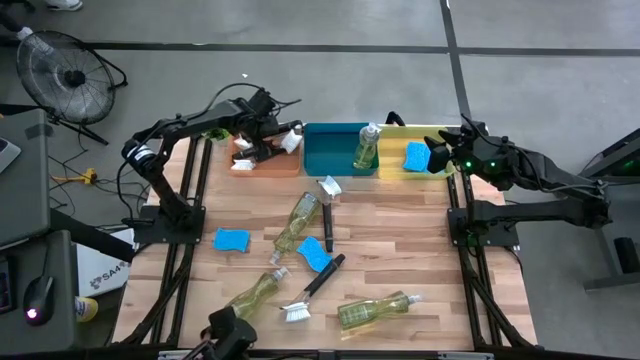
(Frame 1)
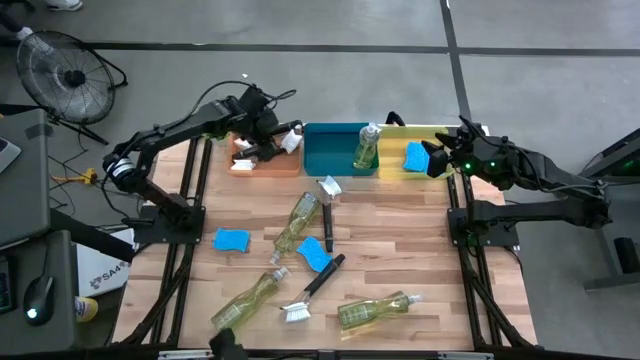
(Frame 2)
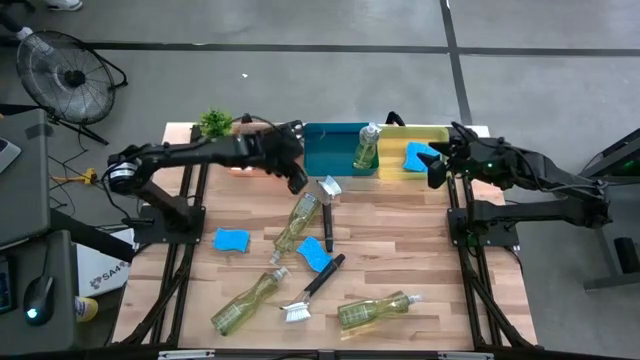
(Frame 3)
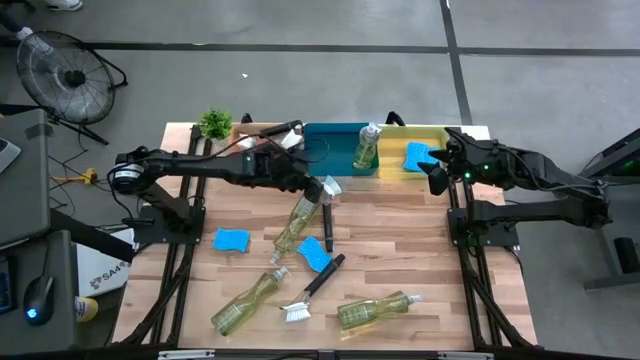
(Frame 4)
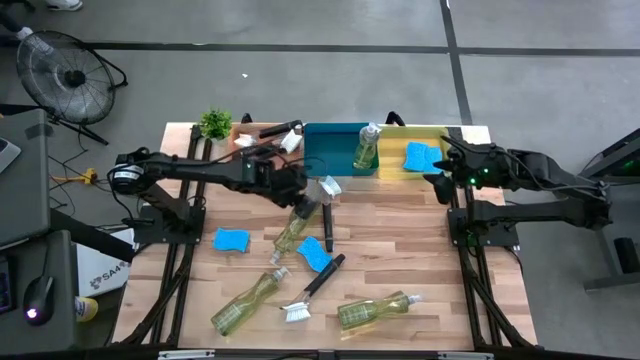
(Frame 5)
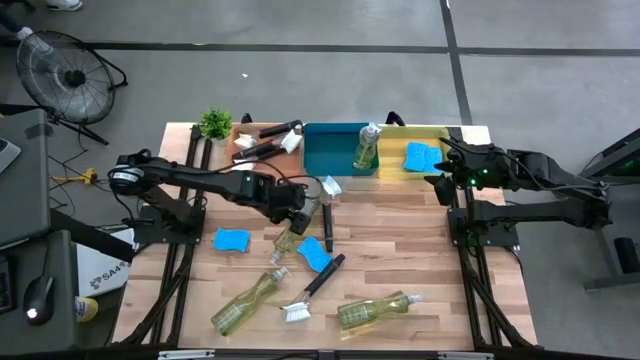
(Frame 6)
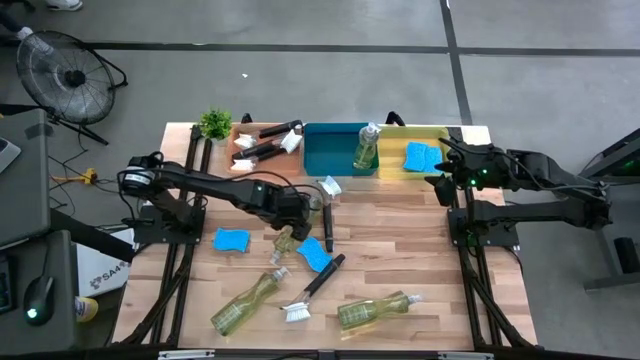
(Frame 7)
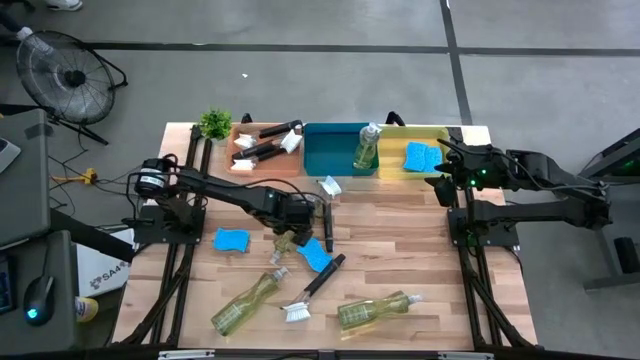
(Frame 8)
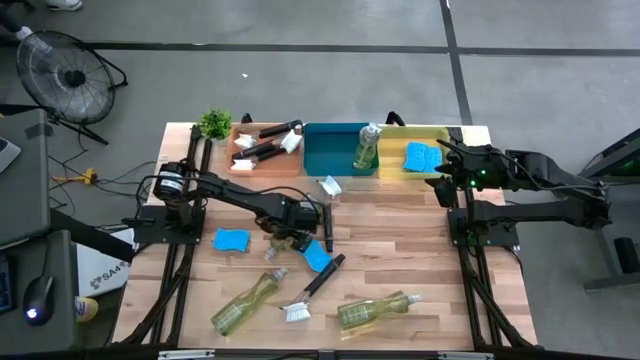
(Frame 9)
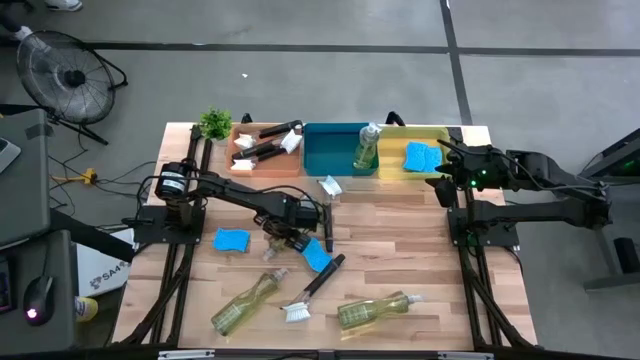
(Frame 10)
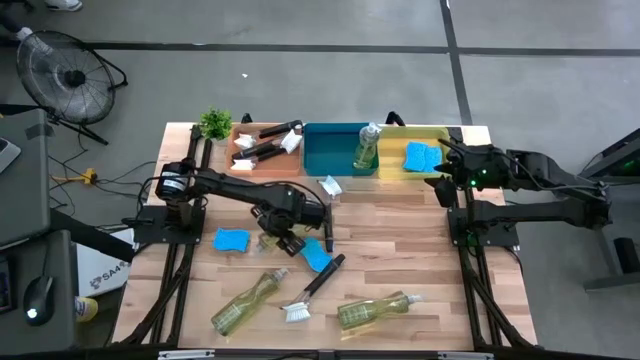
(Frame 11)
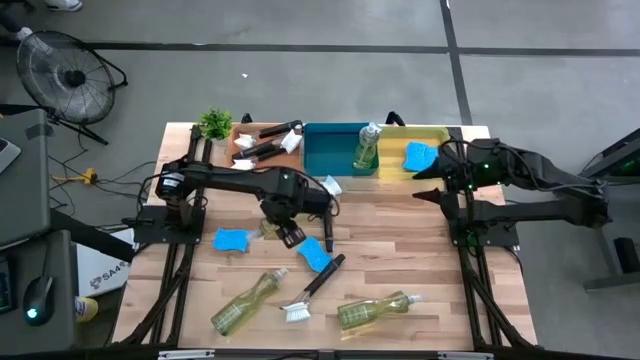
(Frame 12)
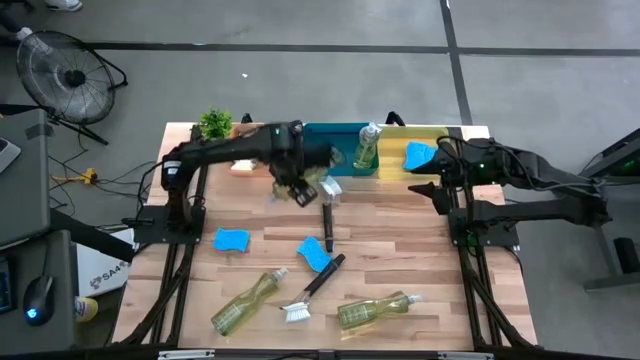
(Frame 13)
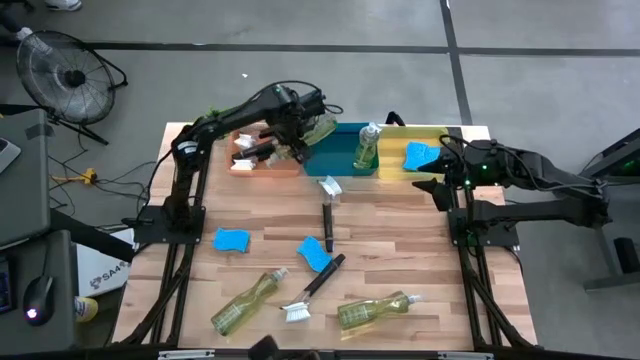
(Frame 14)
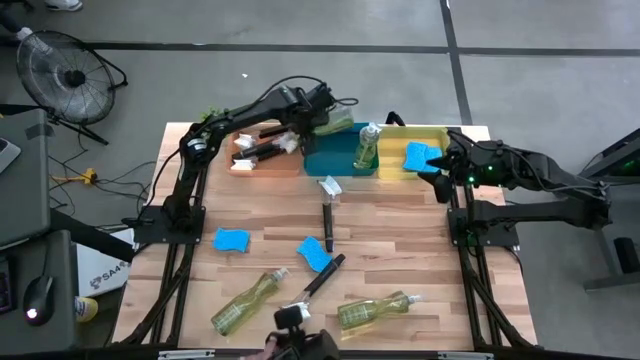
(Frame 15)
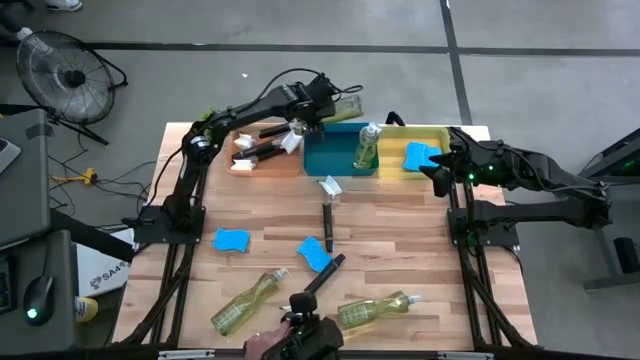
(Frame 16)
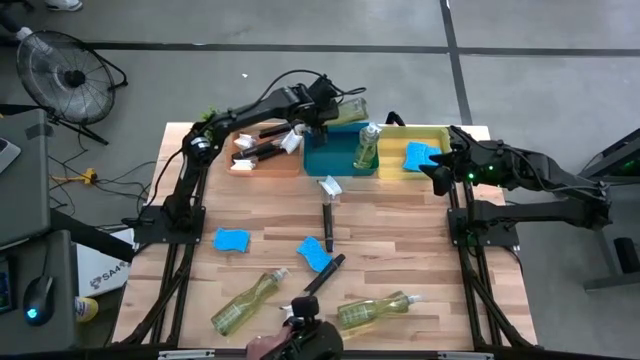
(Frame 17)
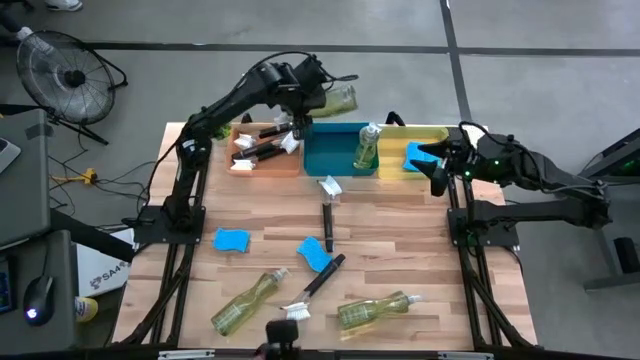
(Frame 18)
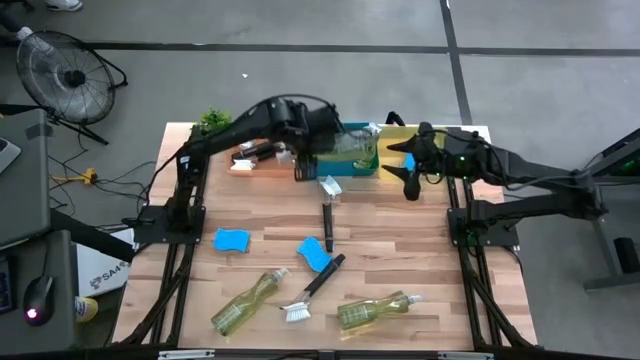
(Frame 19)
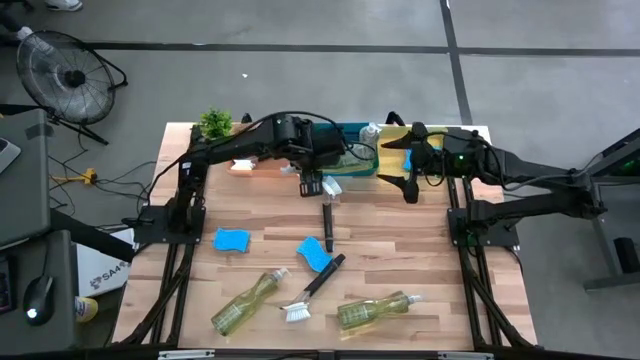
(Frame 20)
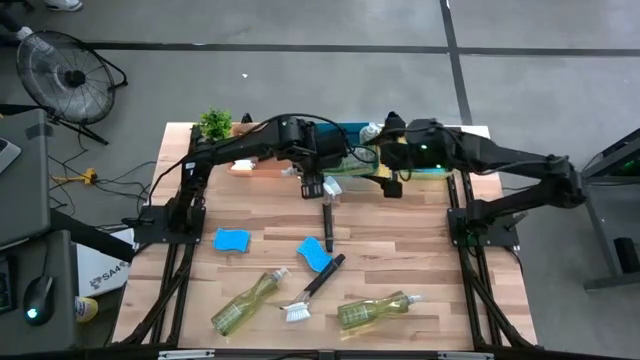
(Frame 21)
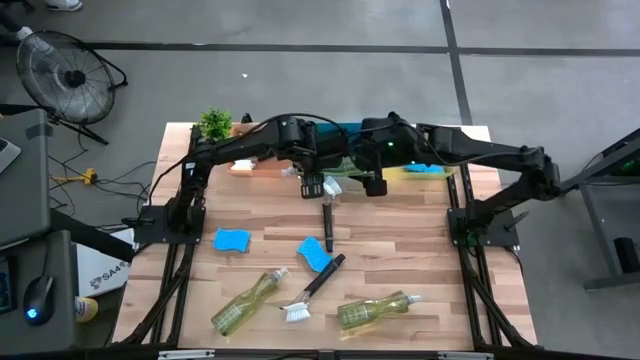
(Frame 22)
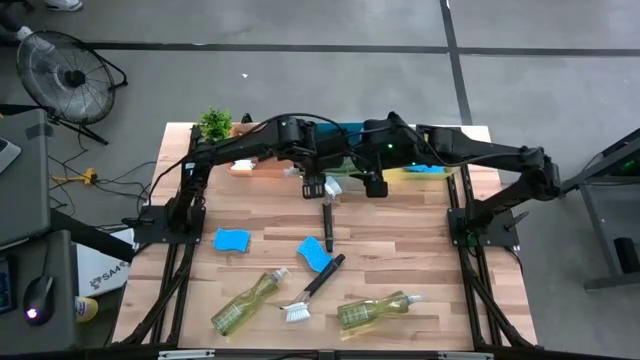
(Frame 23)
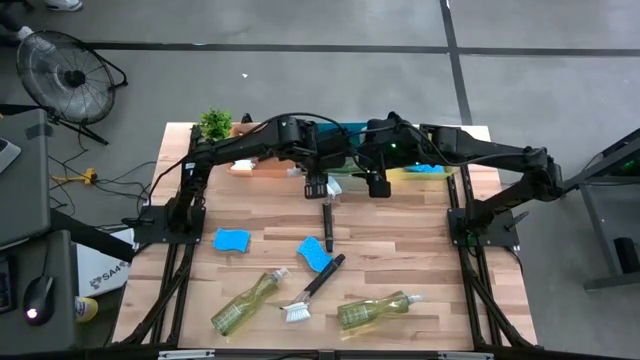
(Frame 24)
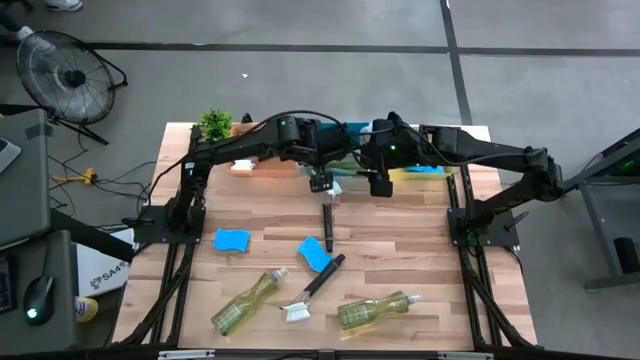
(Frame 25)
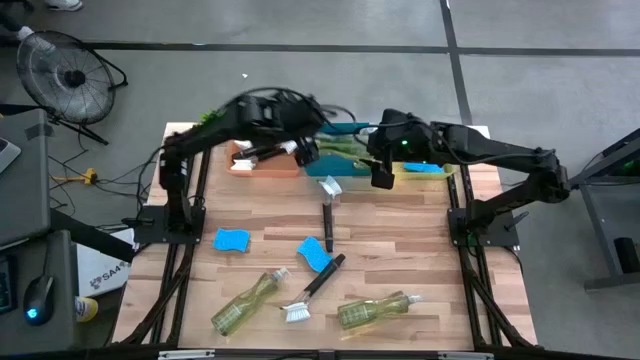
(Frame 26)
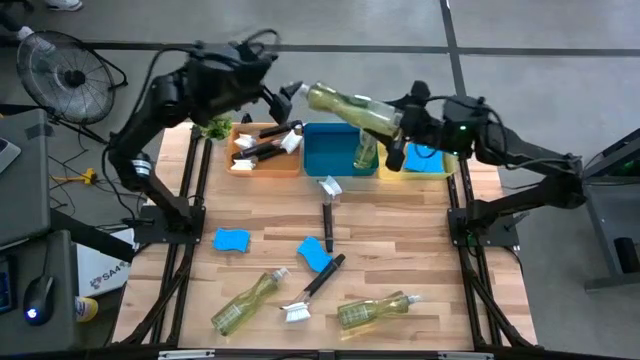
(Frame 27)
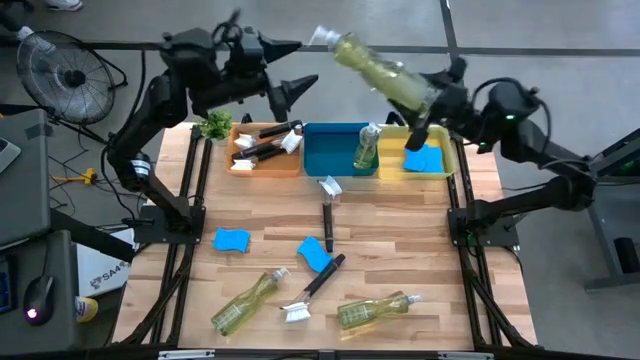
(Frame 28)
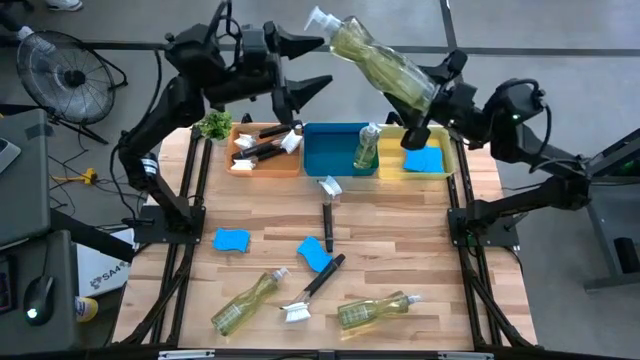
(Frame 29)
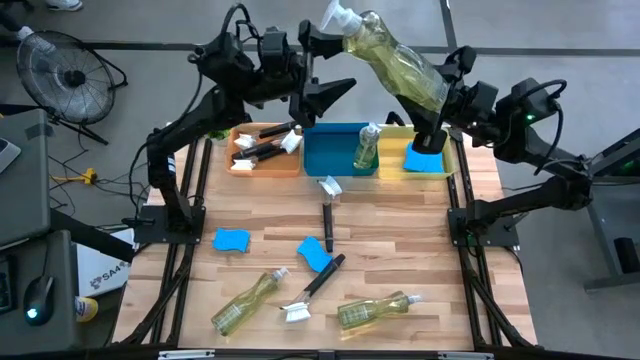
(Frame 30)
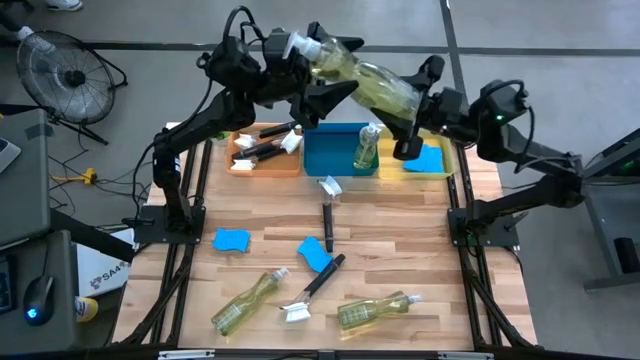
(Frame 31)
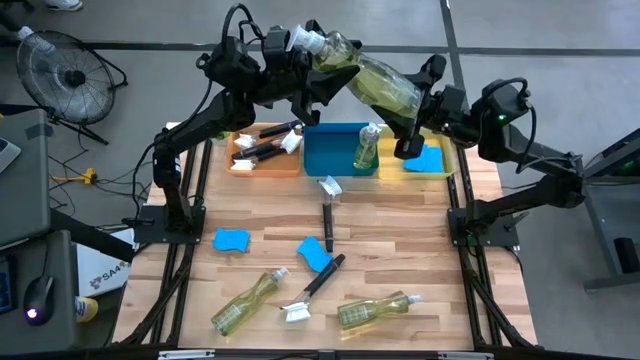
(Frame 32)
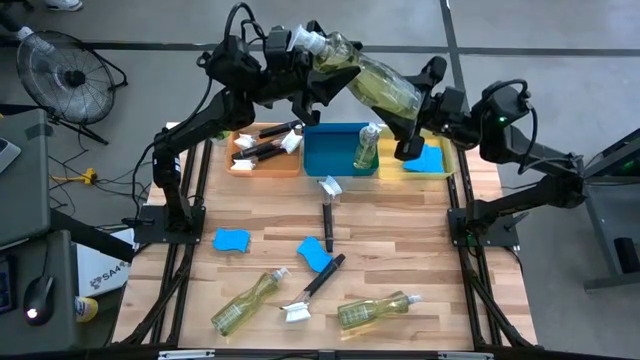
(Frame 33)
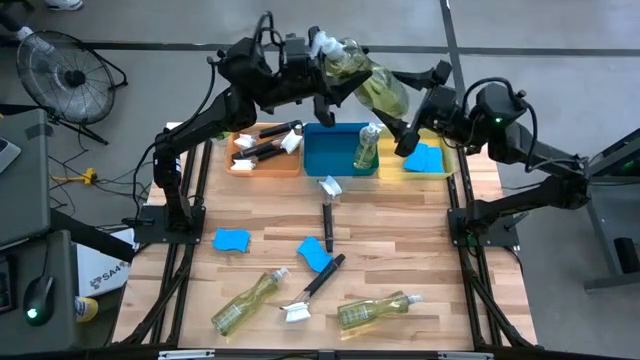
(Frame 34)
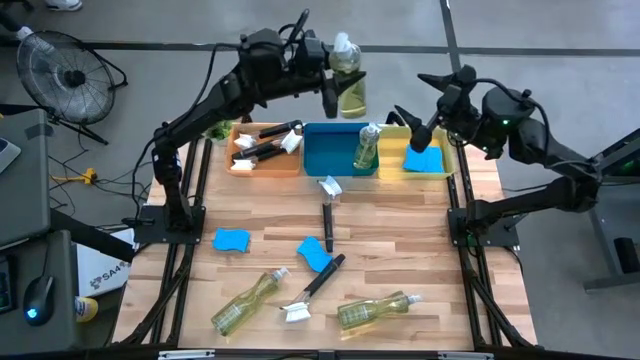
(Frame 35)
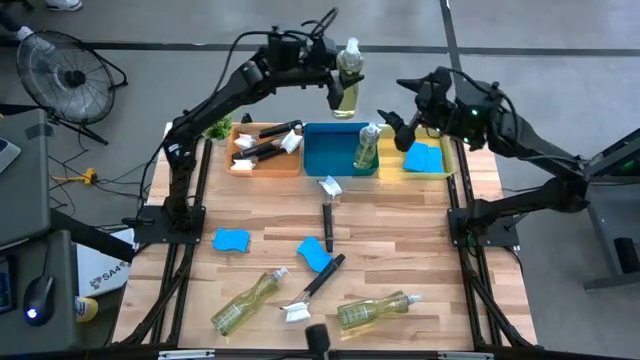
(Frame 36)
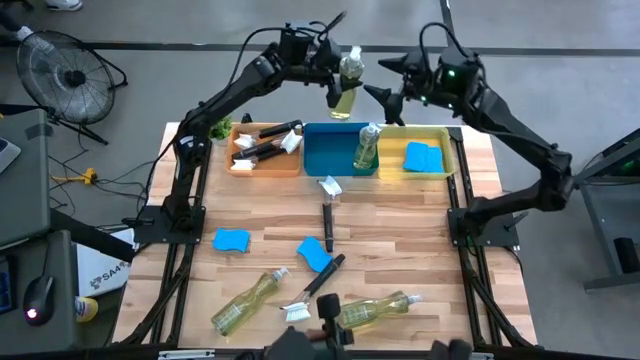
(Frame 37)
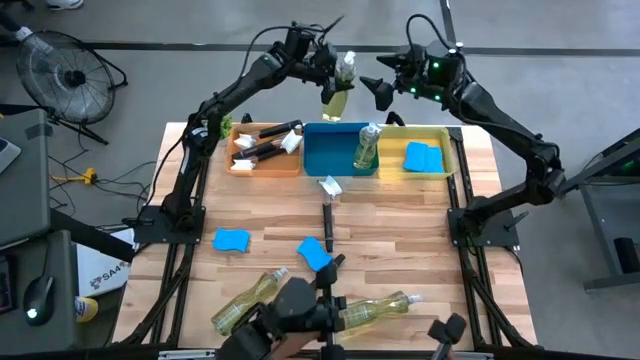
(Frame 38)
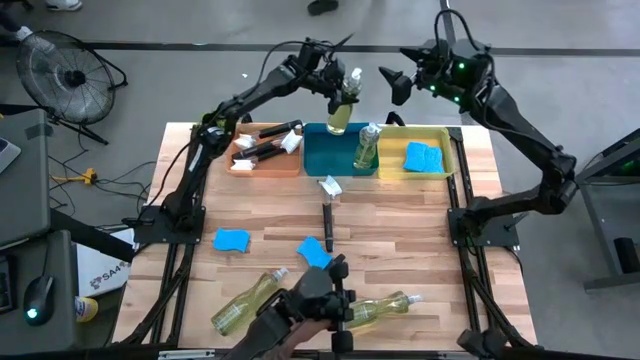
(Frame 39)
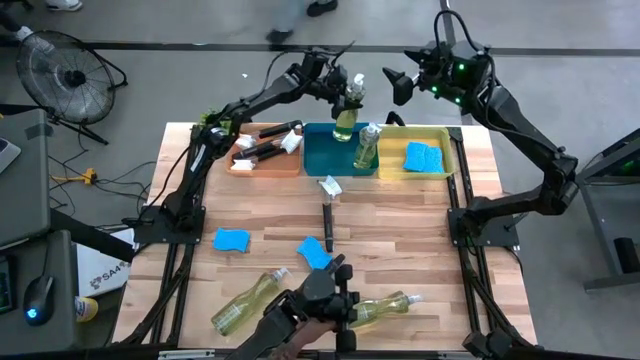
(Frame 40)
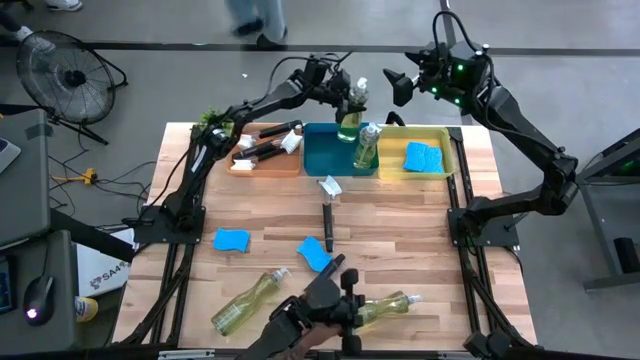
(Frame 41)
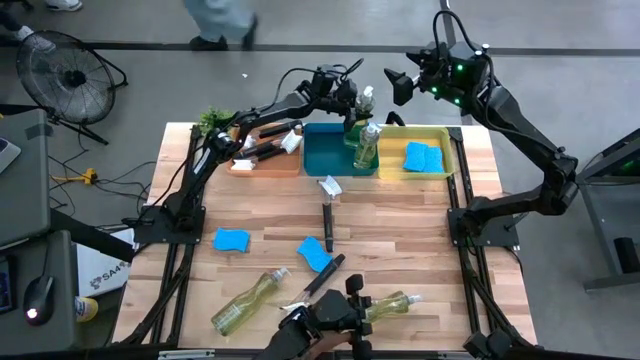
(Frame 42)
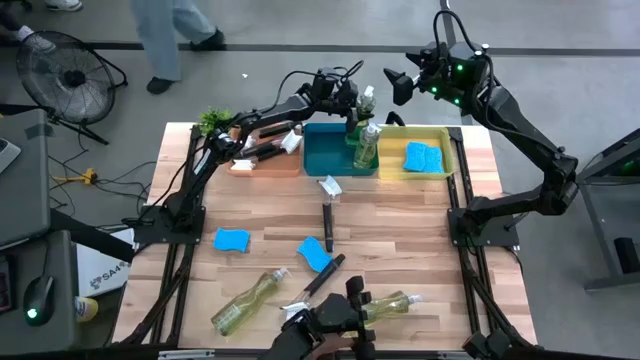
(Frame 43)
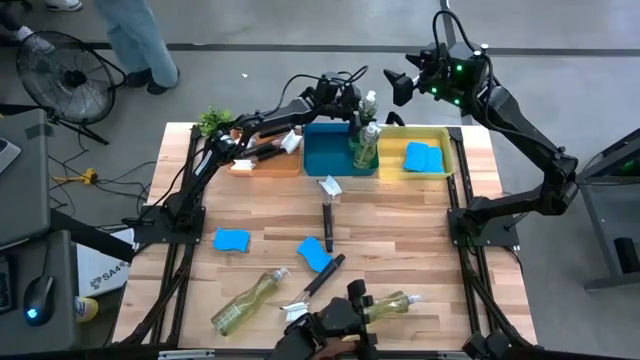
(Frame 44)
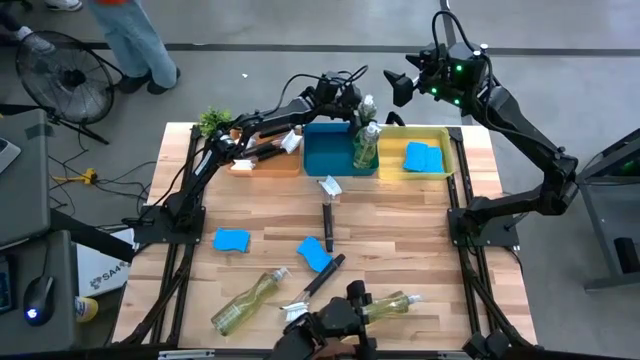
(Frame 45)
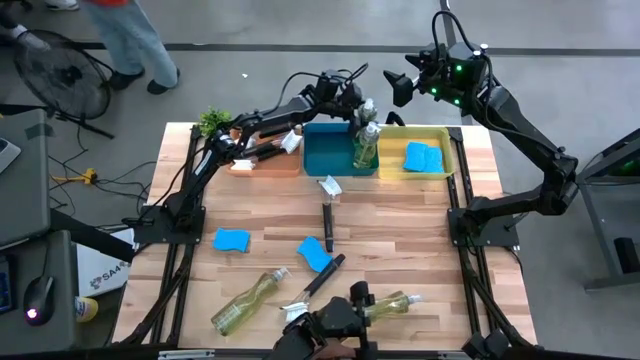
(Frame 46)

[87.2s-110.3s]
Task: Pick & Place Kitchen Sink Supplies
Put the green dishwashing liquid bottle into the blue bin
